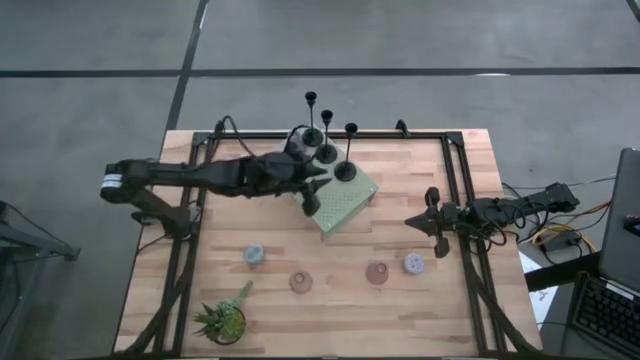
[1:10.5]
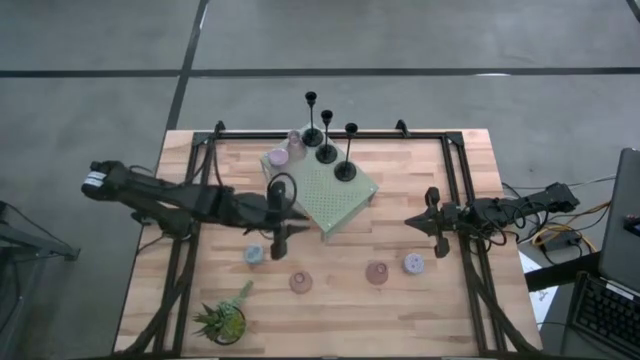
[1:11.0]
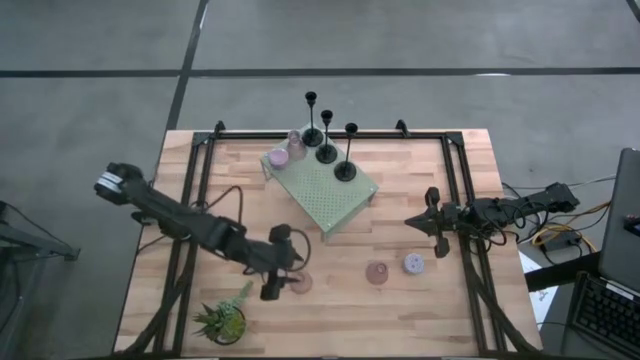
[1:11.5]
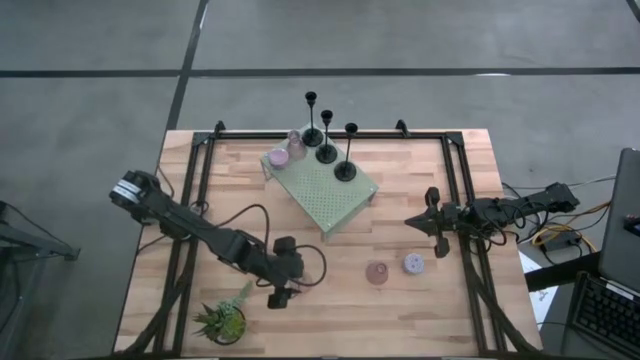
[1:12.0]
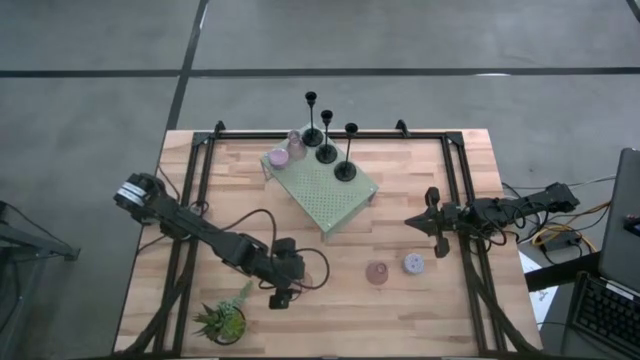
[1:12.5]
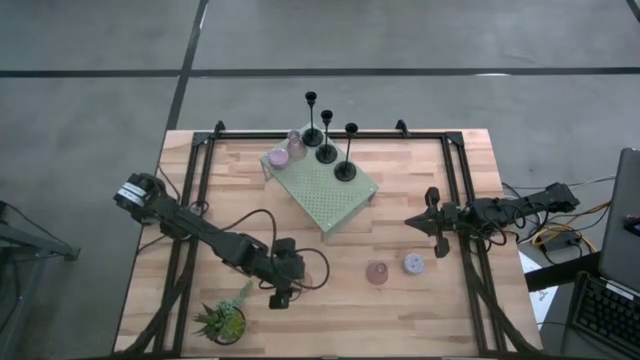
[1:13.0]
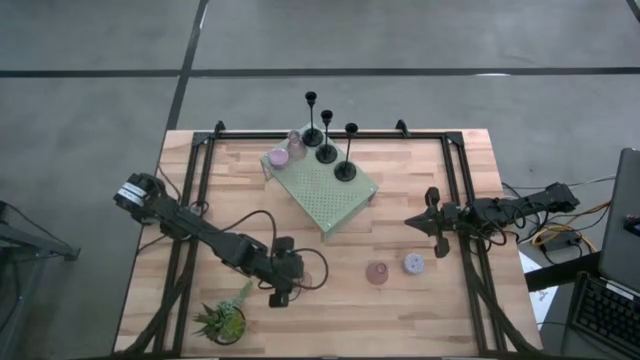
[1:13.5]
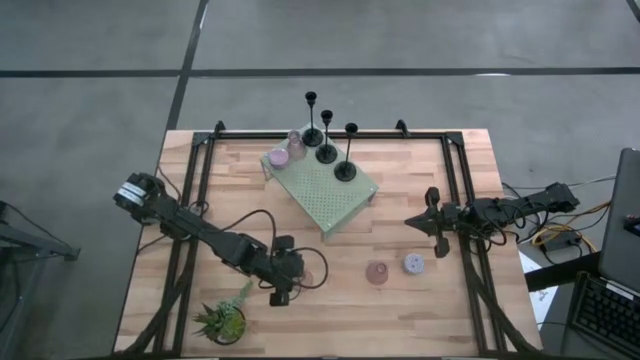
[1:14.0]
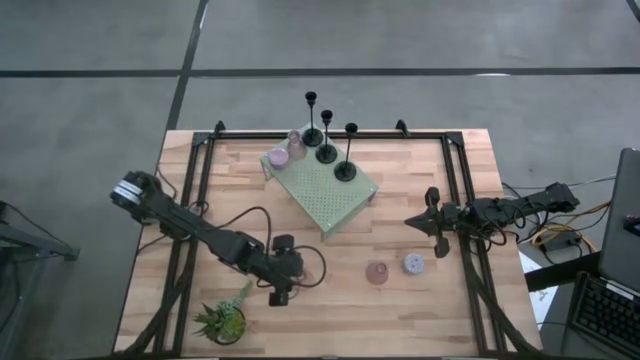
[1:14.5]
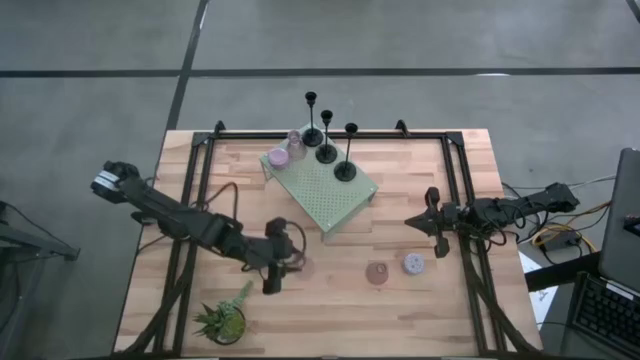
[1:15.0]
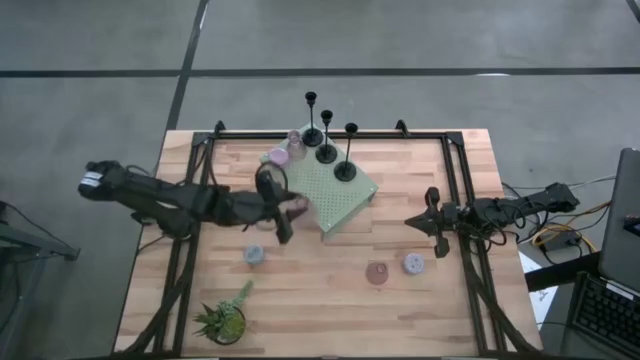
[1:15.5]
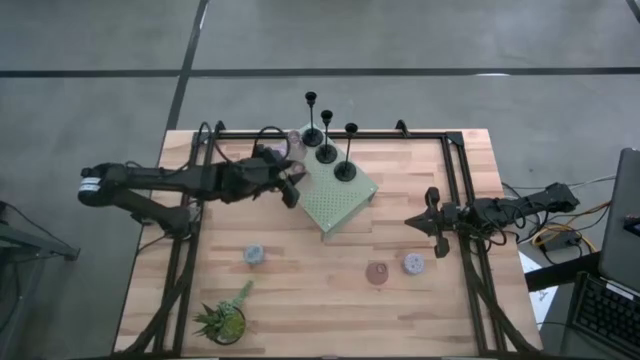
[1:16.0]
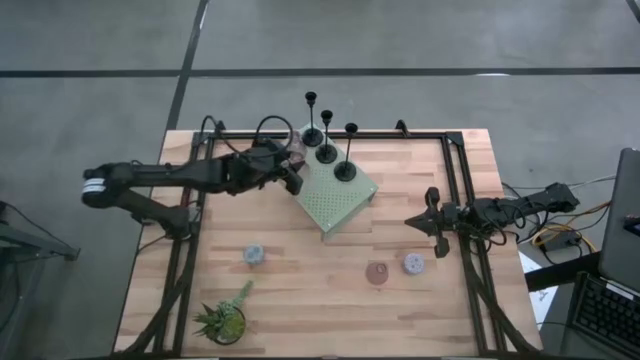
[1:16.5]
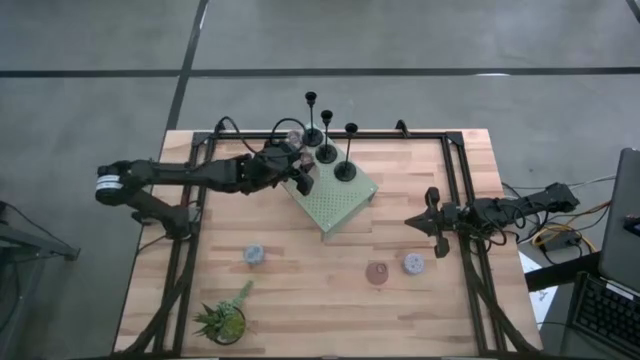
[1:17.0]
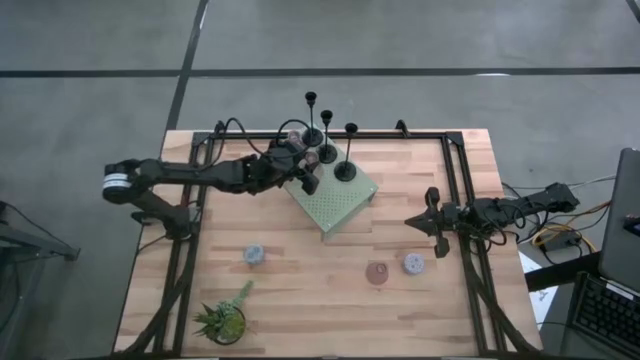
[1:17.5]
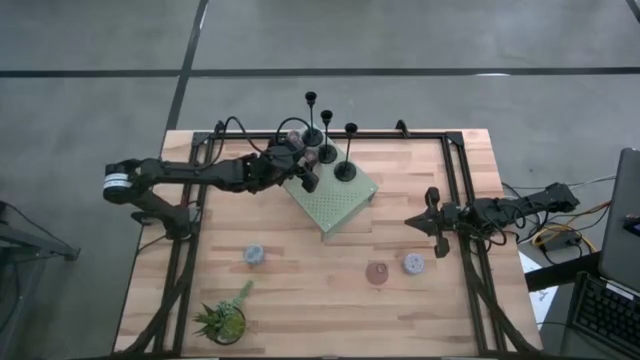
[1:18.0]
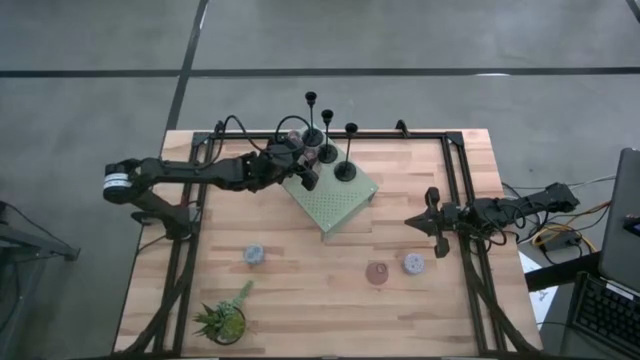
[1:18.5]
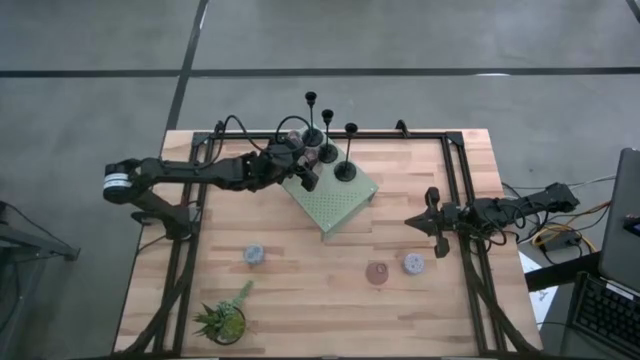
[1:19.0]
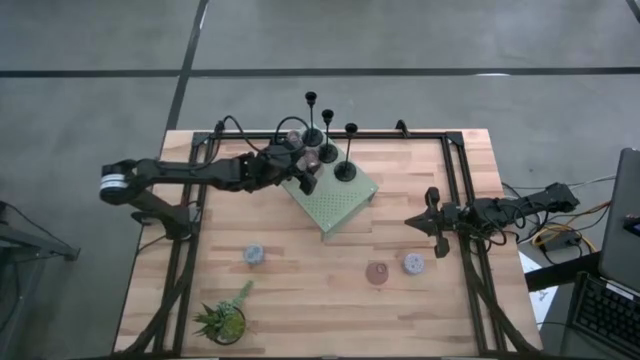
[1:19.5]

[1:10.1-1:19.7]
Task: Pick & Place candle stick holders
Put the left pink glass candle holder on the shelf aligned with the black candle holder

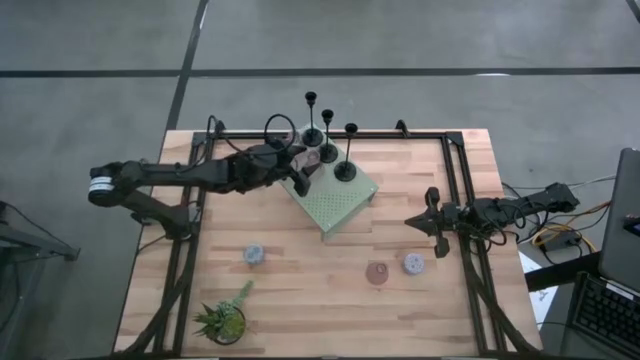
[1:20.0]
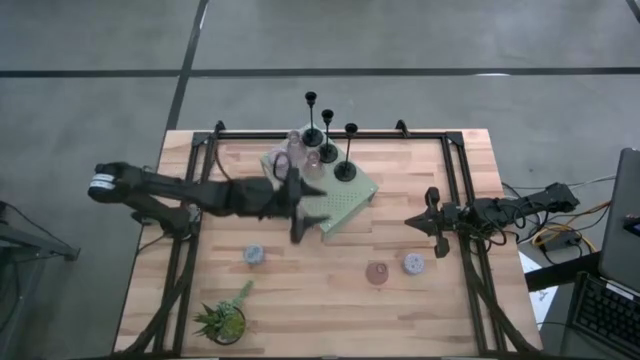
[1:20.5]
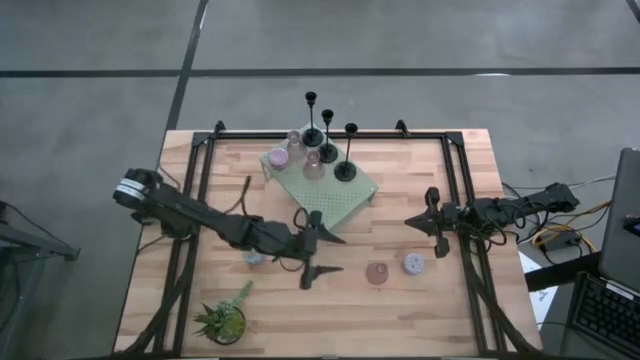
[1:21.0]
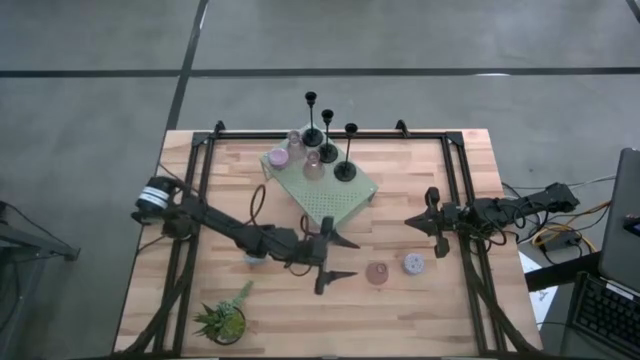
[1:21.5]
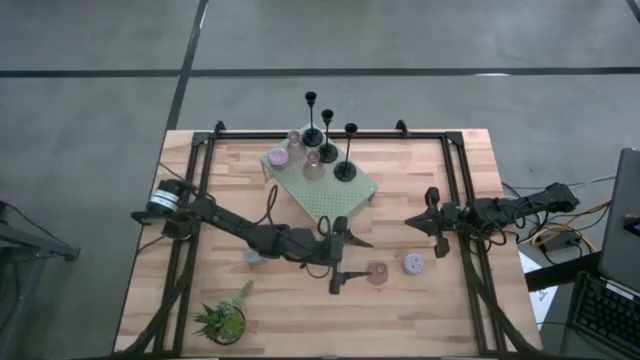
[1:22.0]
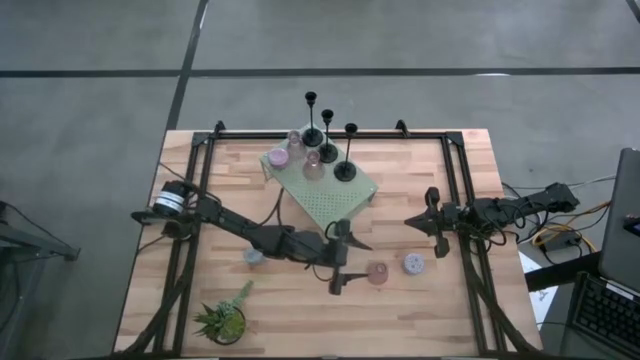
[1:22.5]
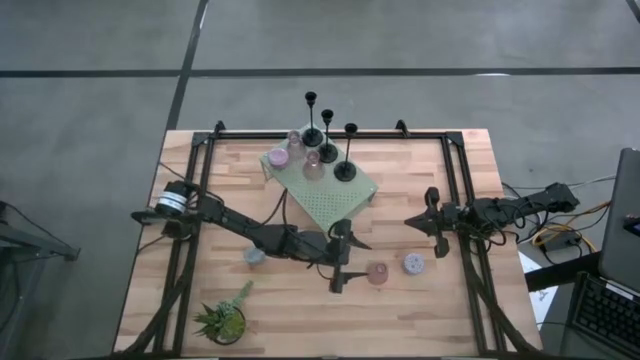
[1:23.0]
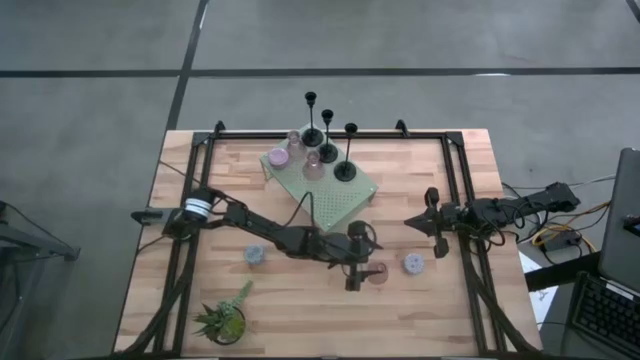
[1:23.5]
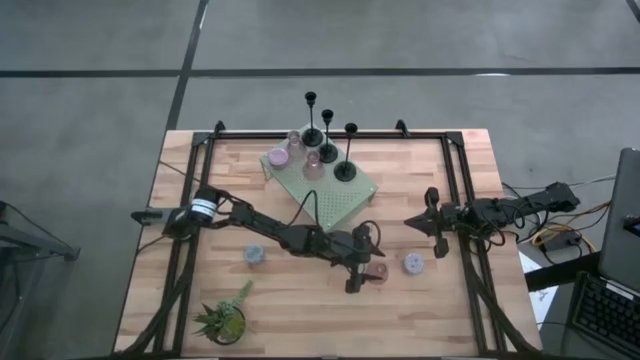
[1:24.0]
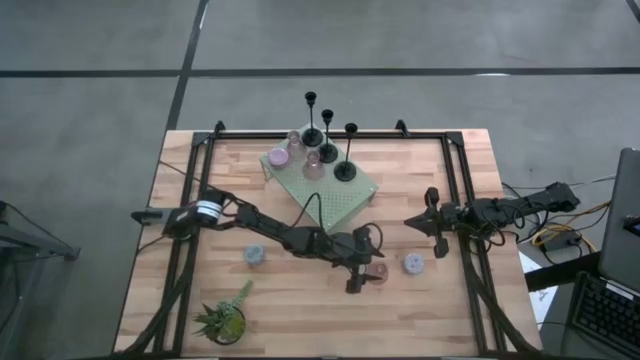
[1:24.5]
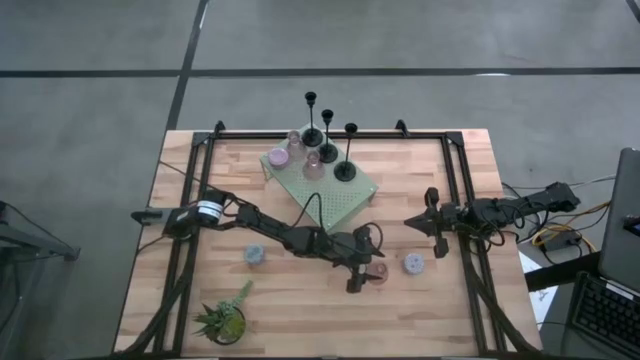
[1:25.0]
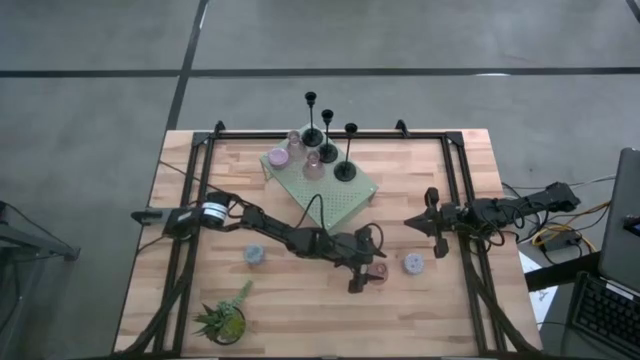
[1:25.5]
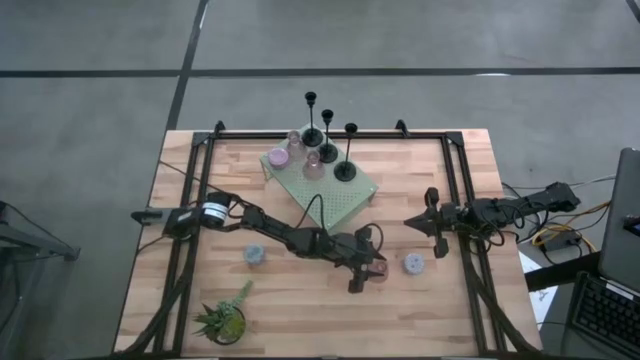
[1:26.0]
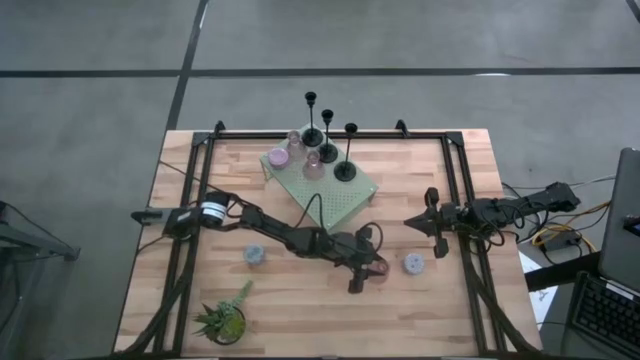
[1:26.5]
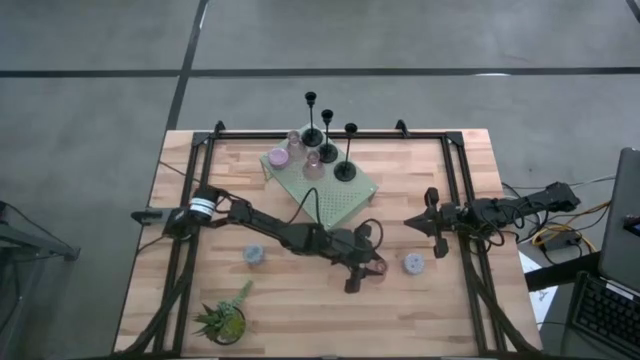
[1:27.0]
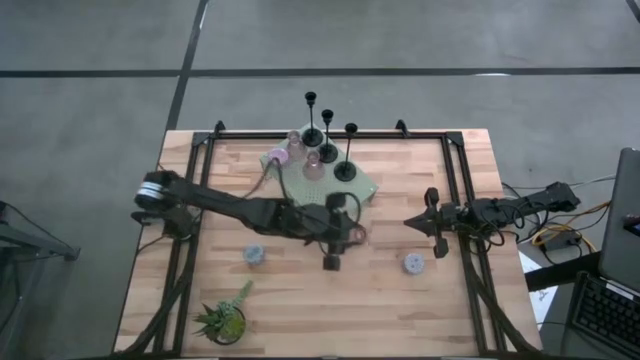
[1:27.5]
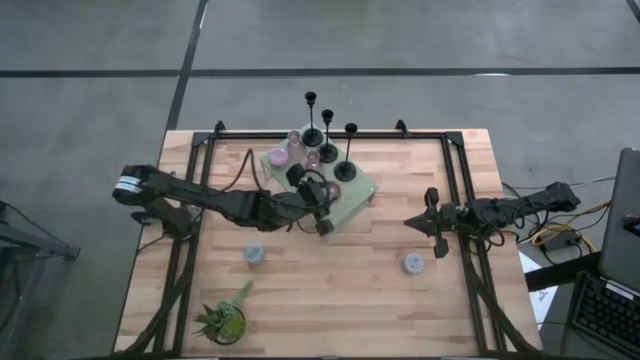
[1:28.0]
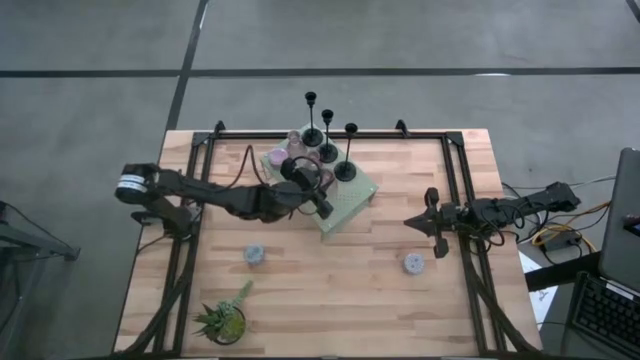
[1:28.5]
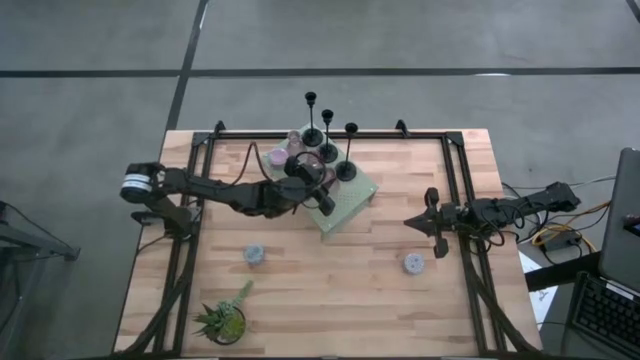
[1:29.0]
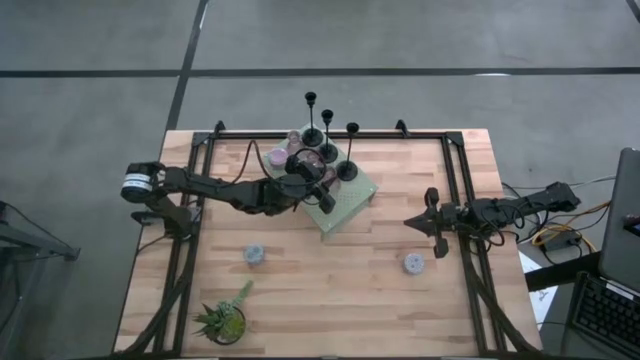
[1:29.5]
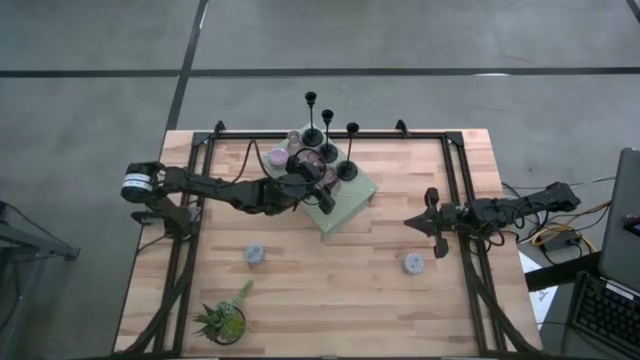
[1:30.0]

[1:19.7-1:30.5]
Put the pink glass candle holder on the shelf aligned with the black candle holder
